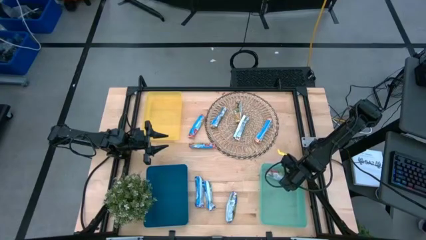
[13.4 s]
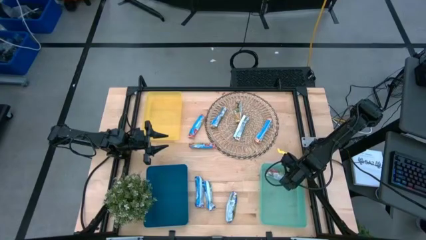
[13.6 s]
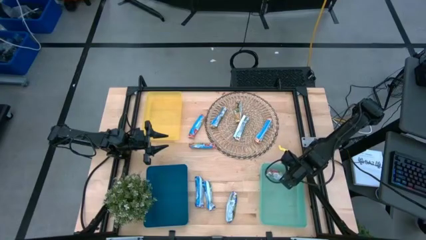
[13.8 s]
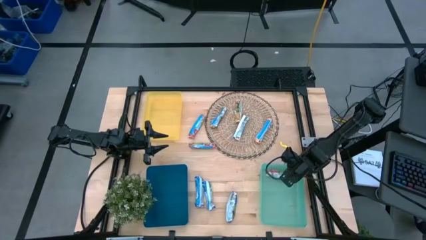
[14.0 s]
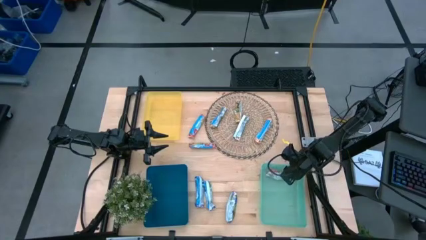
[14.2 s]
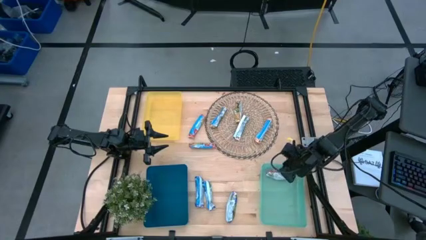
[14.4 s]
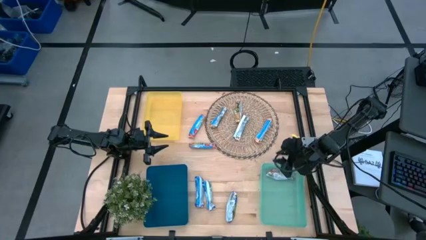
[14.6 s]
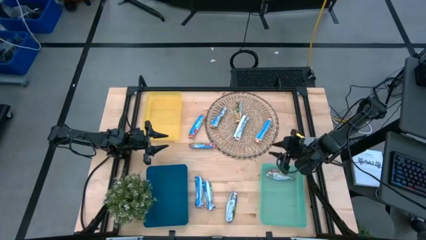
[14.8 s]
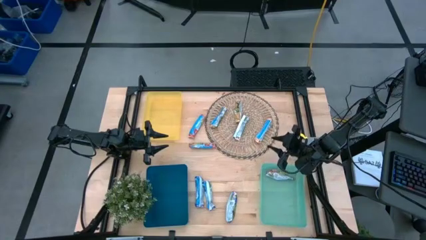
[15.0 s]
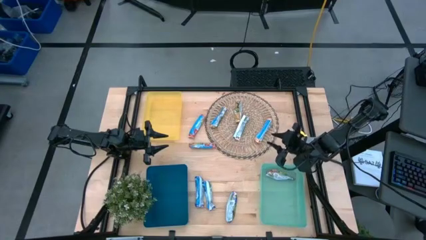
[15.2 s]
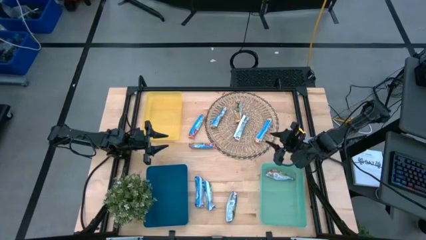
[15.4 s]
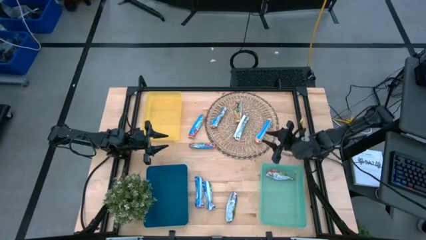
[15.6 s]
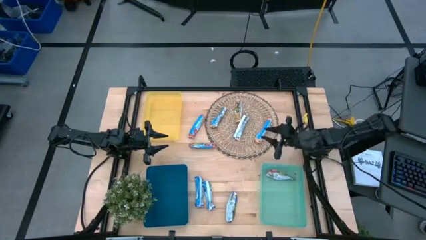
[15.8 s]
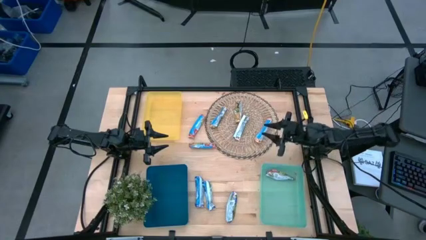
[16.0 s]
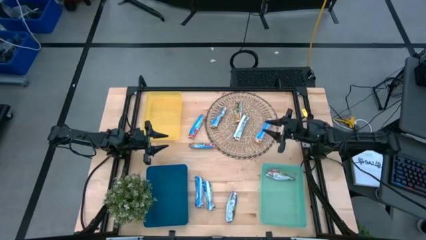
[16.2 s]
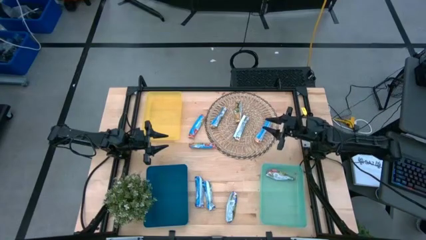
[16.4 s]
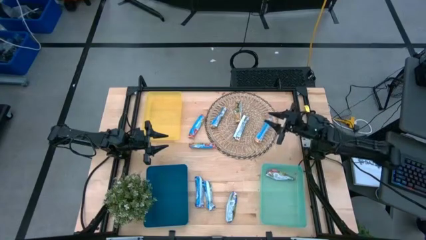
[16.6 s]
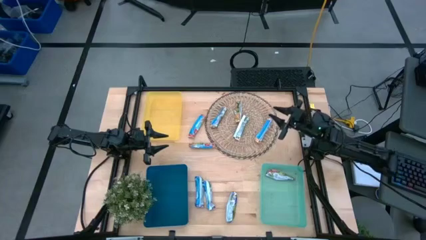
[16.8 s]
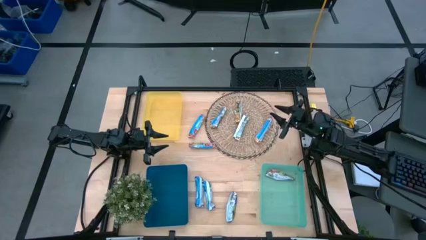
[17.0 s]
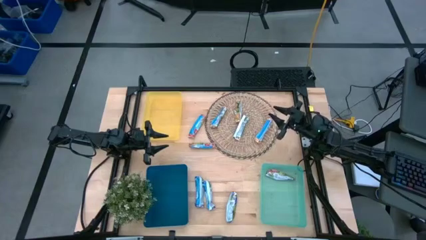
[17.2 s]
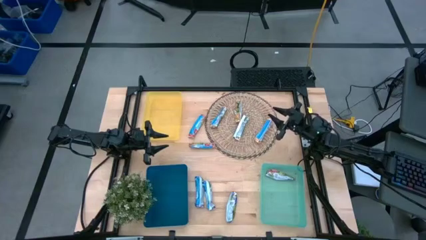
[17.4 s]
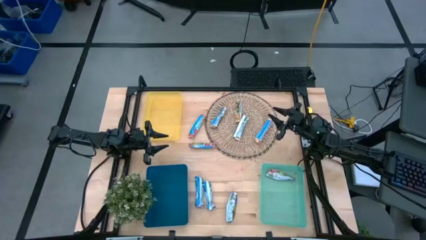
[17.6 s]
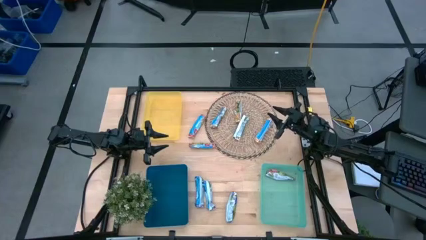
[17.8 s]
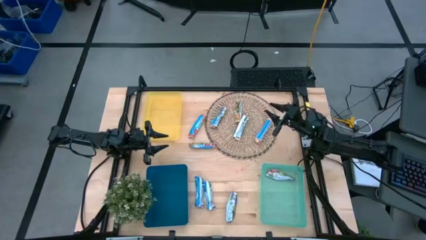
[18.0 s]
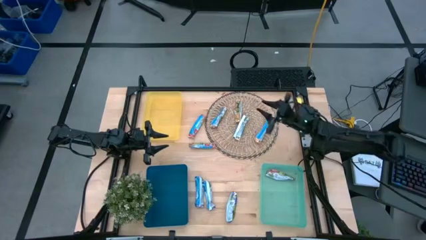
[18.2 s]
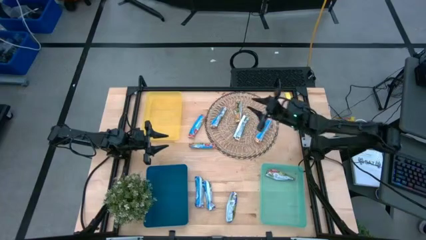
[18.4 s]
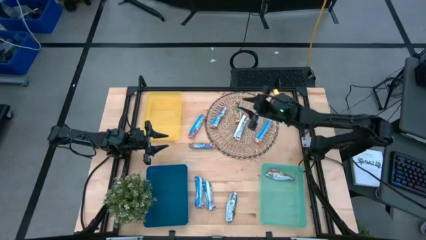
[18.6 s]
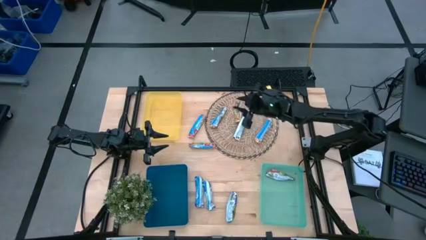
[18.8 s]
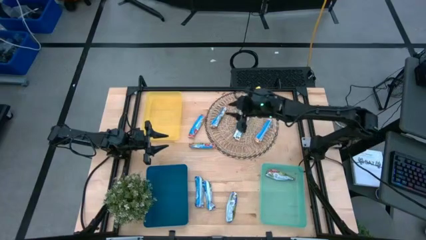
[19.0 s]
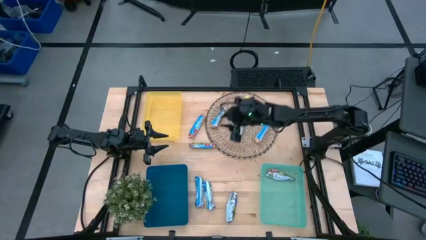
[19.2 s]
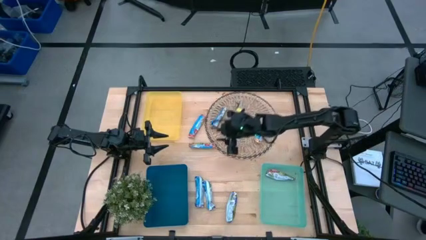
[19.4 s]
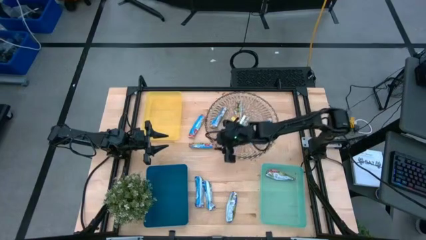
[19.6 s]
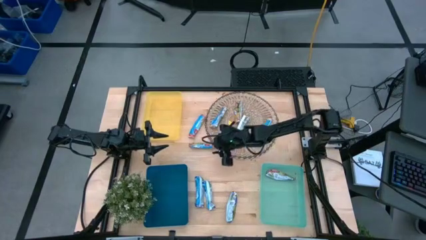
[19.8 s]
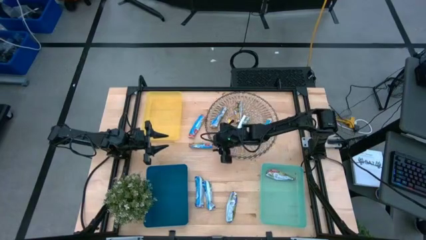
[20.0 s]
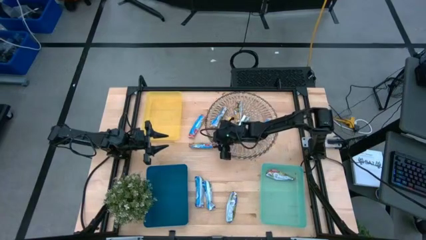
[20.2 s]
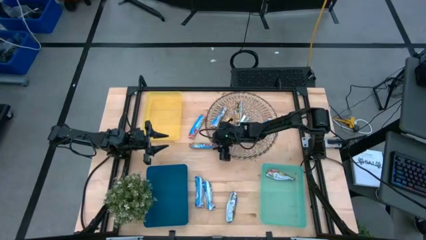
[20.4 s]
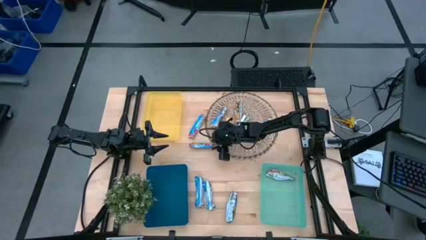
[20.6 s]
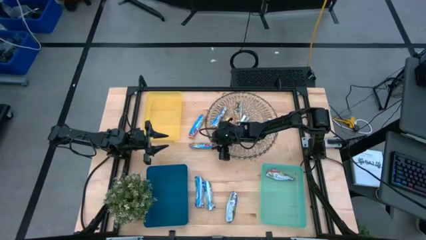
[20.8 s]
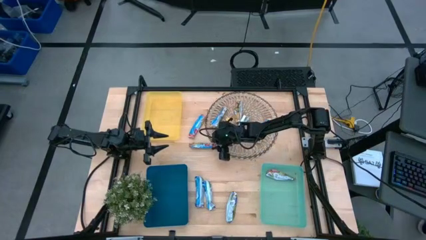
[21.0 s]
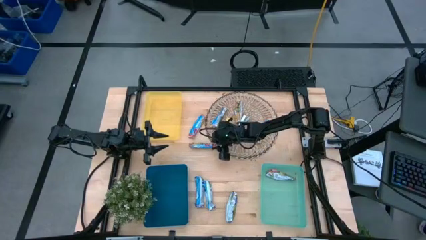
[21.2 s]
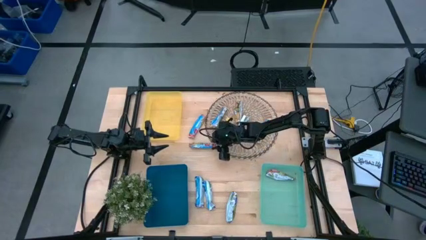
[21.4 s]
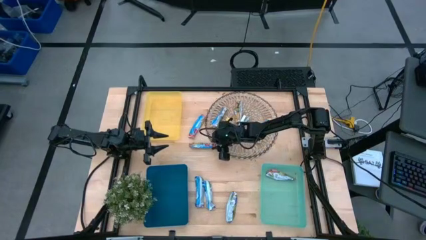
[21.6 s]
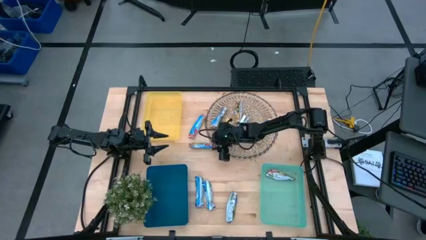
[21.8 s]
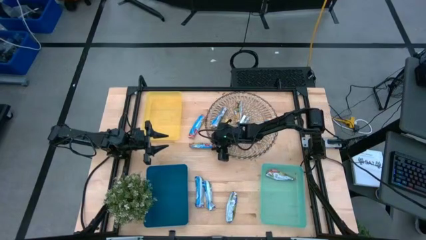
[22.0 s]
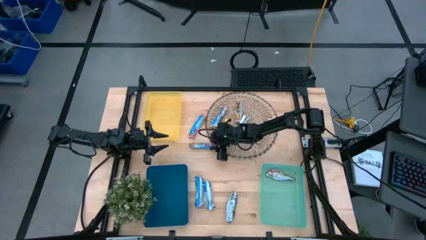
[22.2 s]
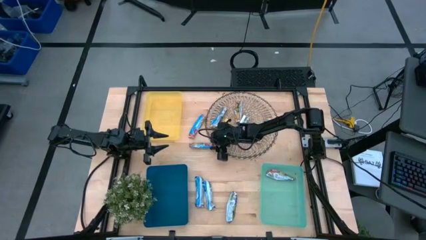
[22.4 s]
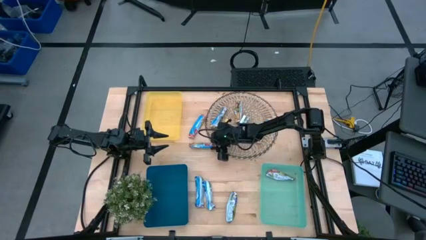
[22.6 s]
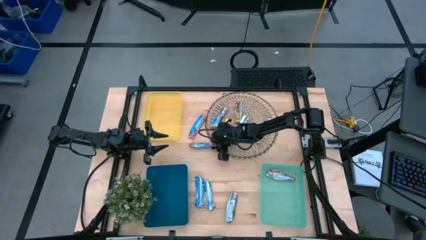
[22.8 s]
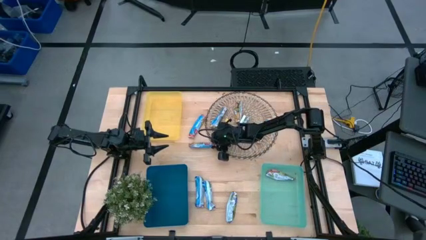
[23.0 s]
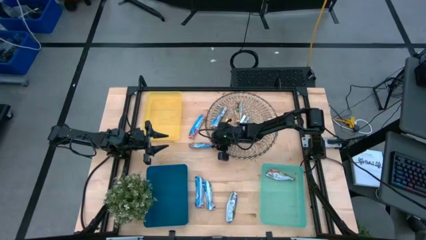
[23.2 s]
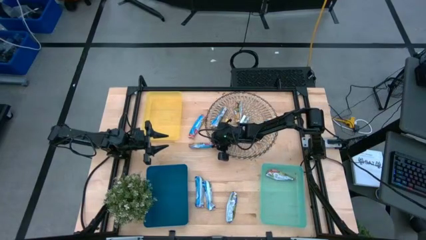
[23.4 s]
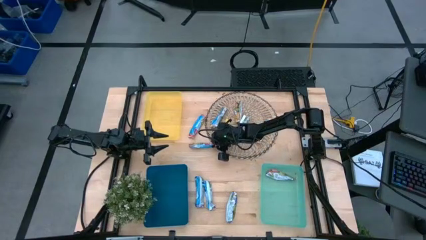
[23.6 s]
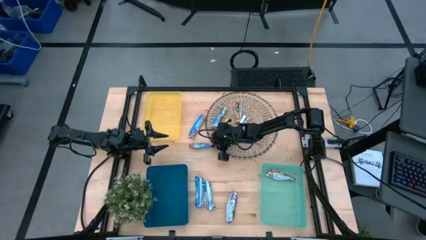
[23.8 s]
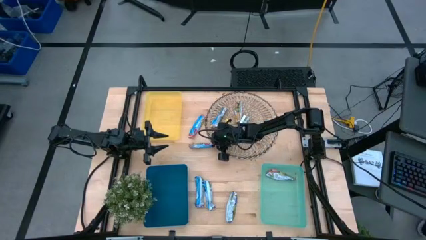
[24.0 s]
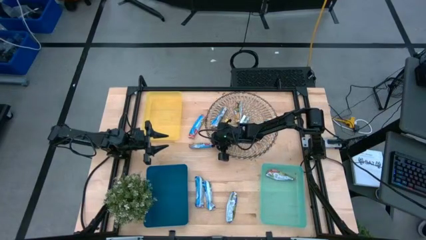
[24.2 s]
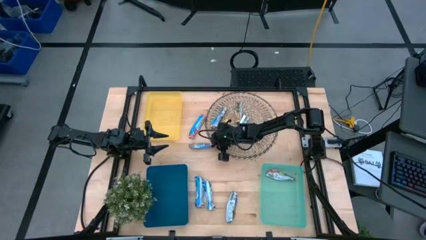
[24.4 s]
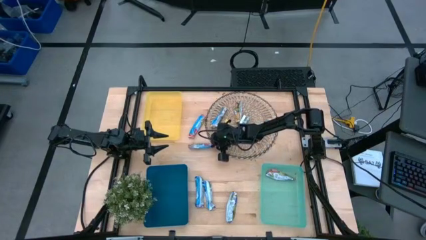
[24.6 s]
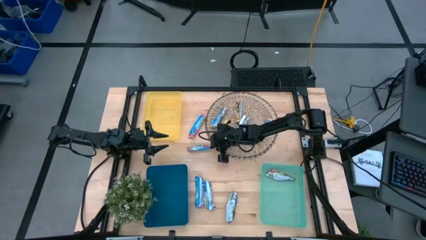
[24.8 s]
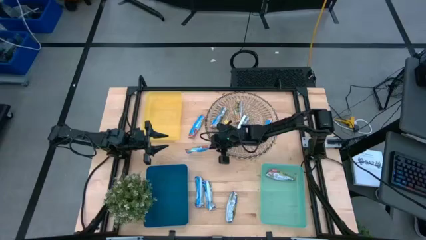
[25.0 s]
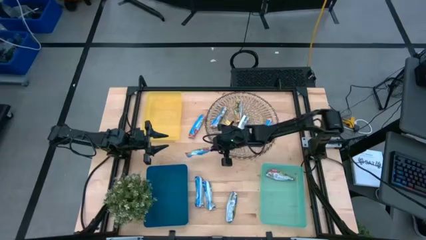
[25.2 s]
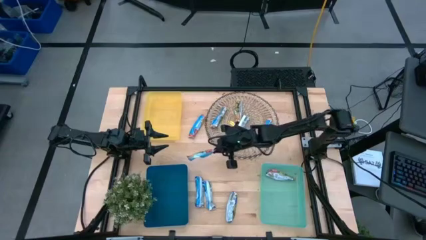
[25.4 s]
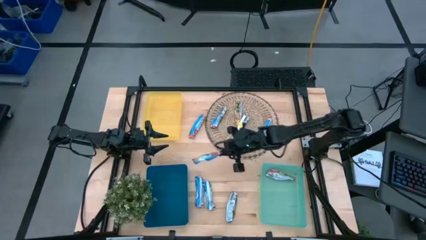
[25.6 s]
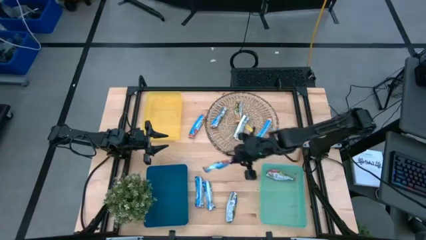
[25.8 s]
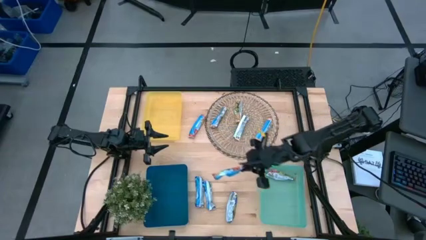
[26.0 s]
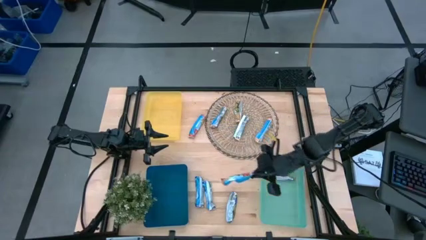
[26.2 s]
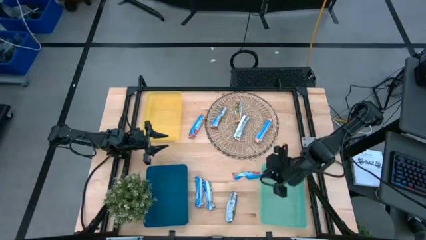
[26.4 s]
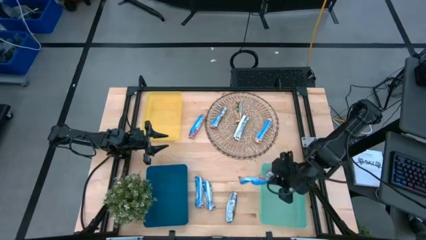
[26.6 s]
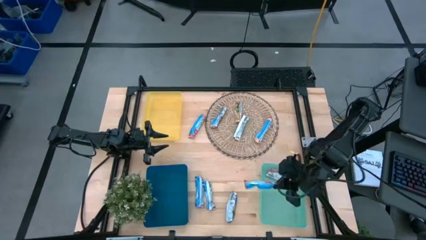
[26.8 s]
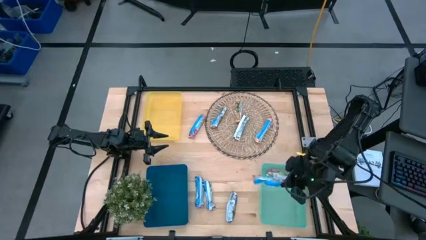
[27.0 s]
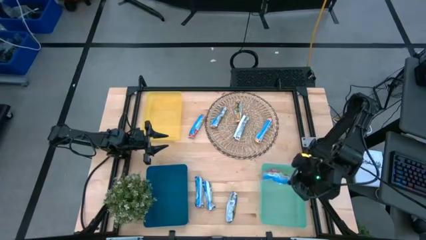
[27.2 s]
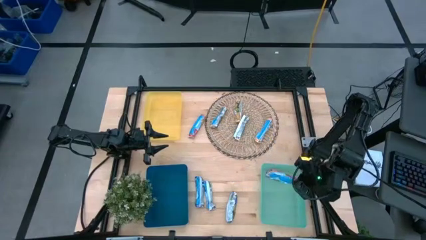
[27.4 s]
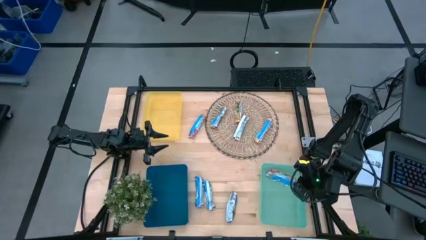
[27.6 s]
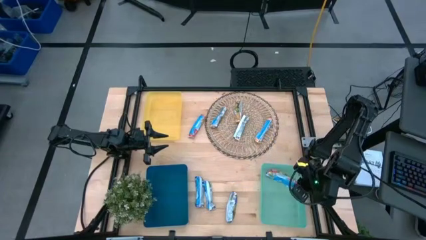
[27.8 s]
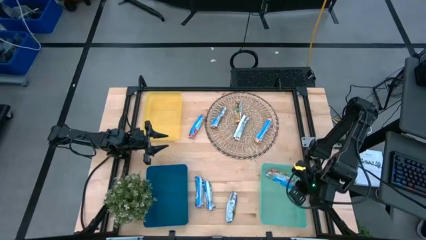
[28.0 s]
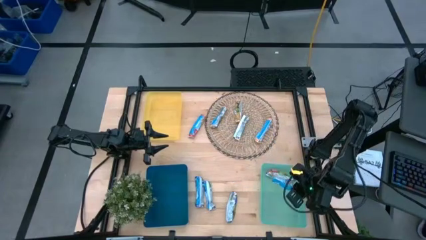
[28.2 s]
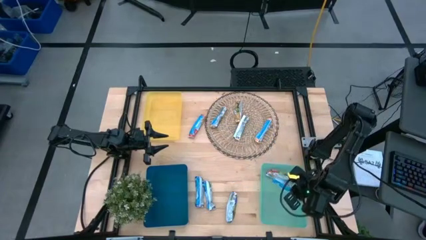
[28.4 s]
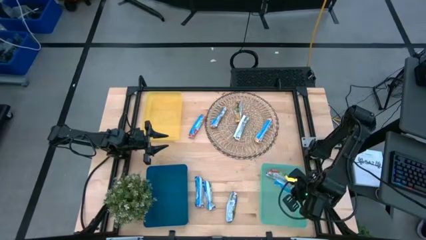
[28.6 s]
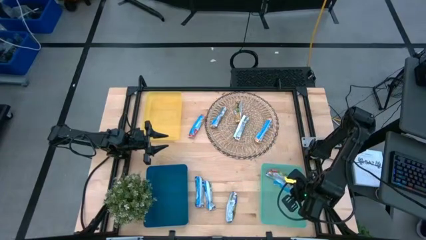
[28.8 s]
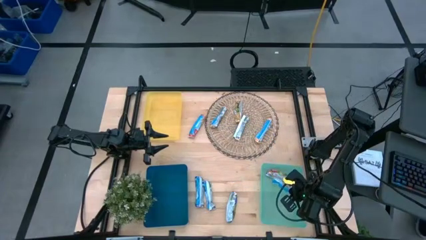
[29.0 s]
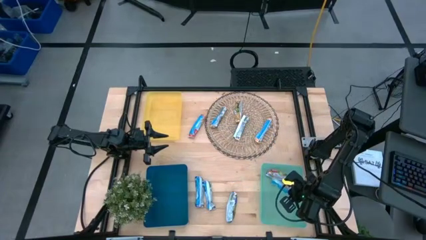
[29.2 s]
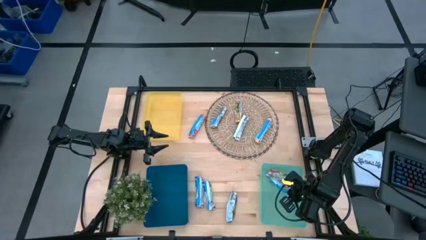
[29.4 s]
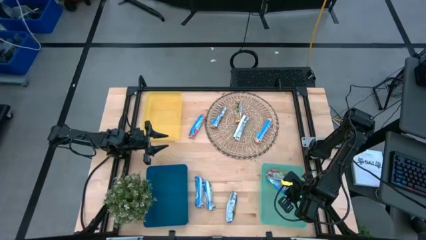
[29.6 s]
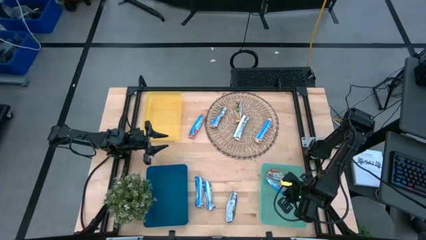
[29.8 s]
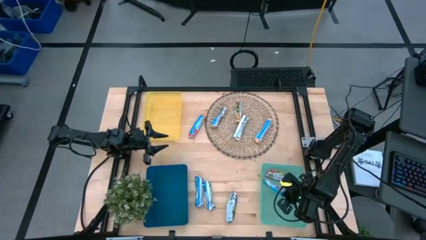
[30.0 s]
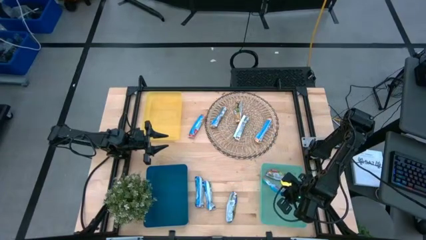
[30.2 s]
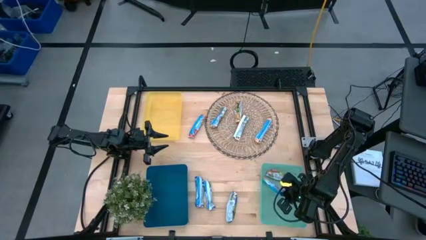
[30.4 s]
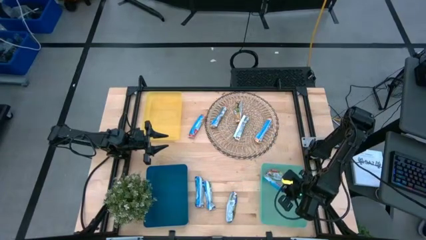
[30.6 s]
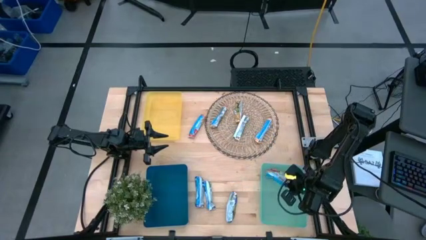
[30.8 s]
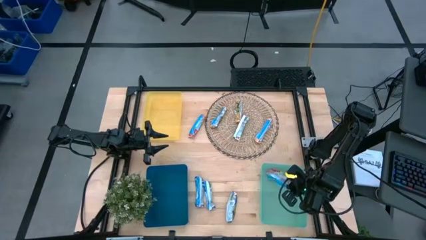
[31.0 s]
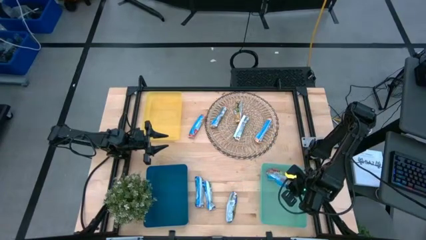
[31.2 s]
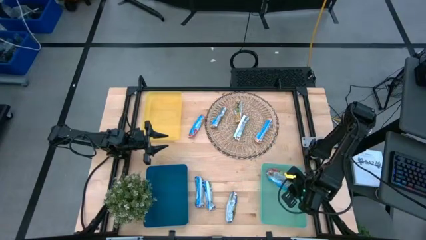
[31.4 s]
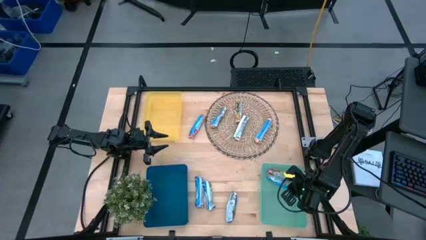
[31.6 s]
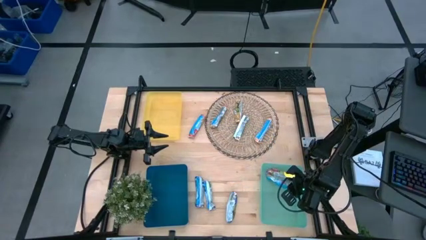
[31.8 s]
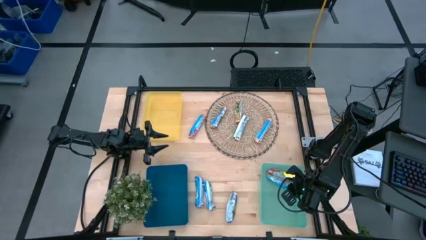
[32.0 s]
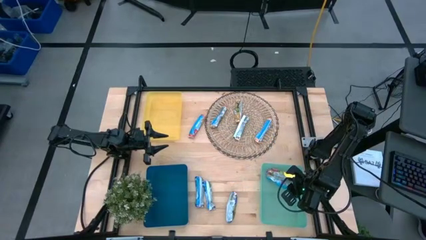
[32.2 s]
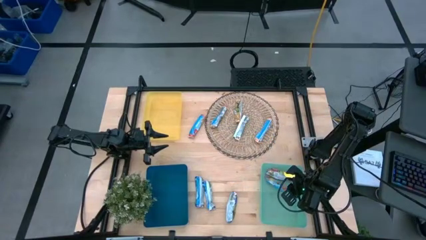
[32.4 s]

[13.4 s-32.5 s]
Task: Pick and place Granola Bars by type
Put the red granola bar into the light blue bin
